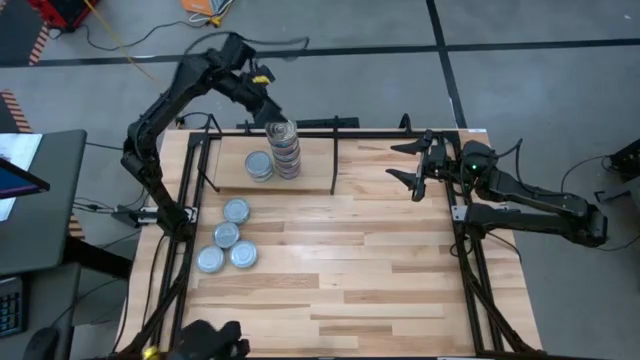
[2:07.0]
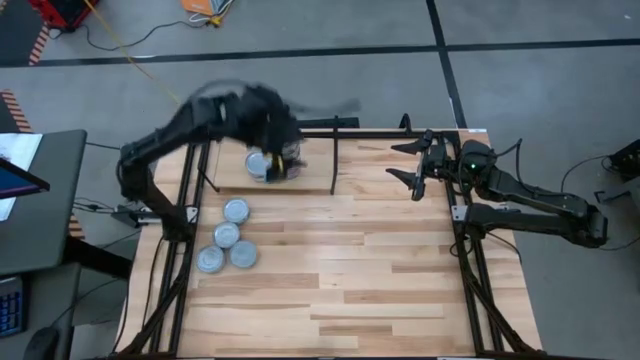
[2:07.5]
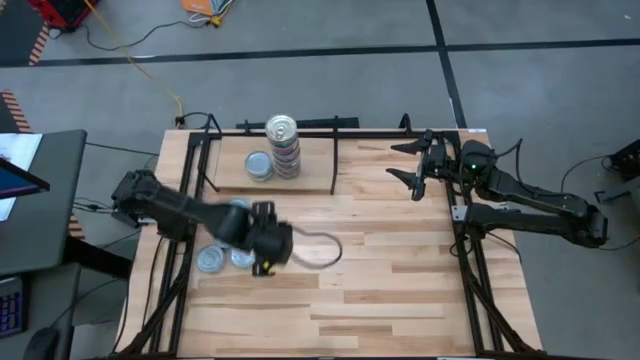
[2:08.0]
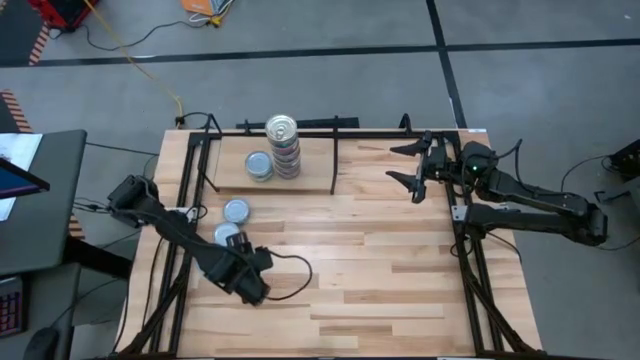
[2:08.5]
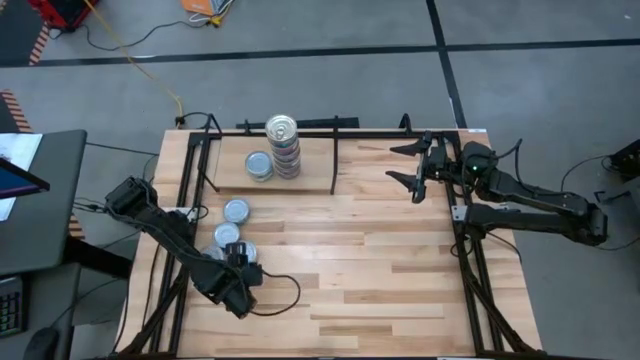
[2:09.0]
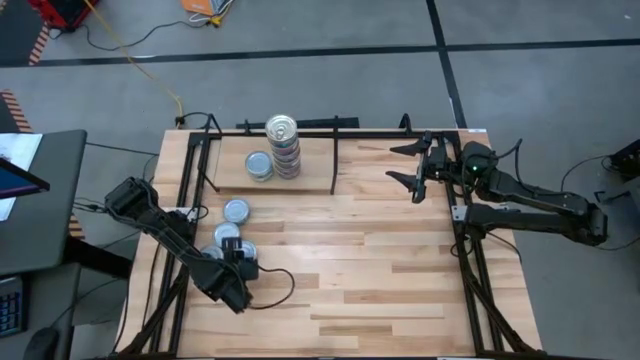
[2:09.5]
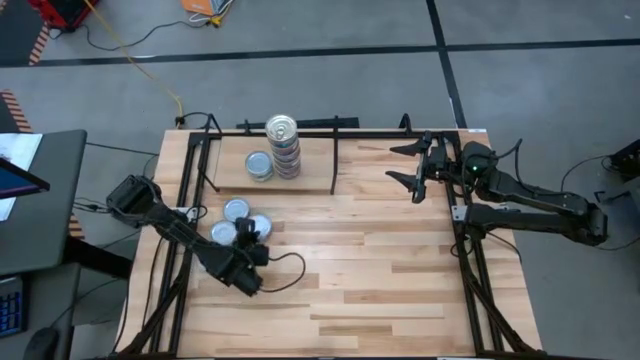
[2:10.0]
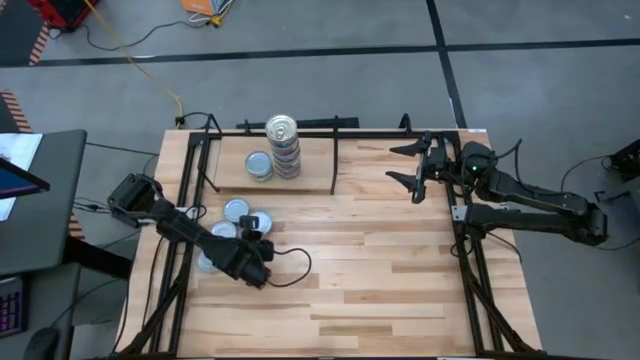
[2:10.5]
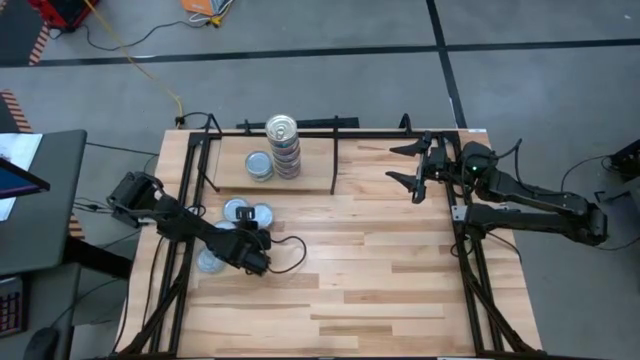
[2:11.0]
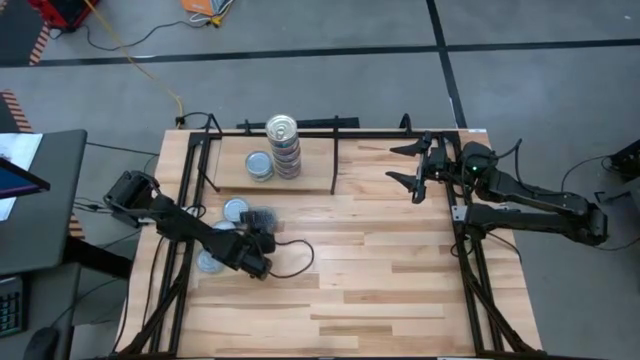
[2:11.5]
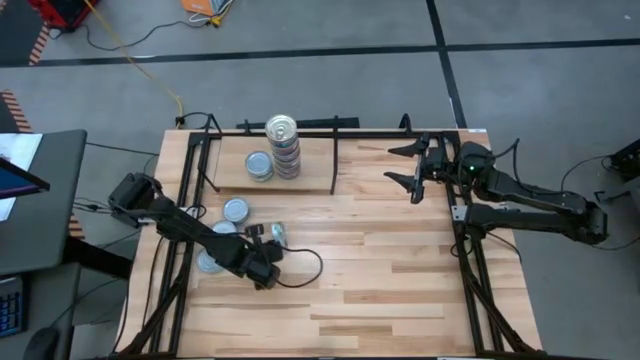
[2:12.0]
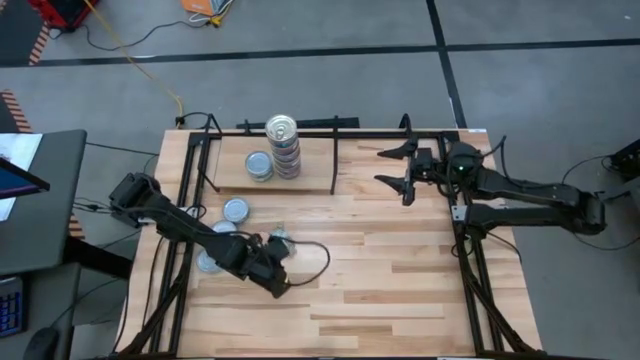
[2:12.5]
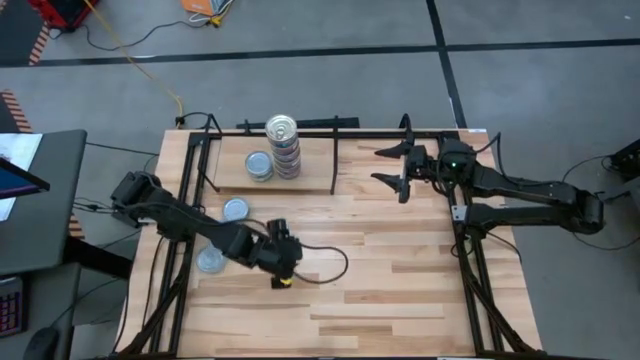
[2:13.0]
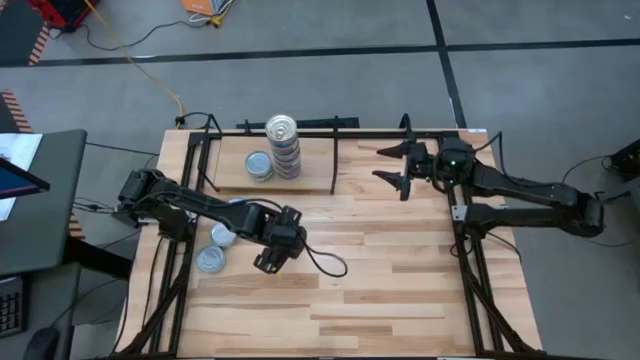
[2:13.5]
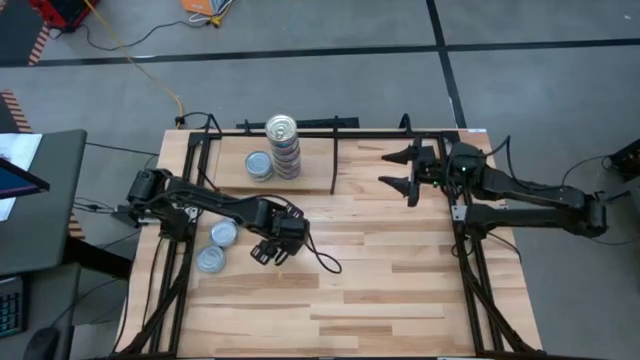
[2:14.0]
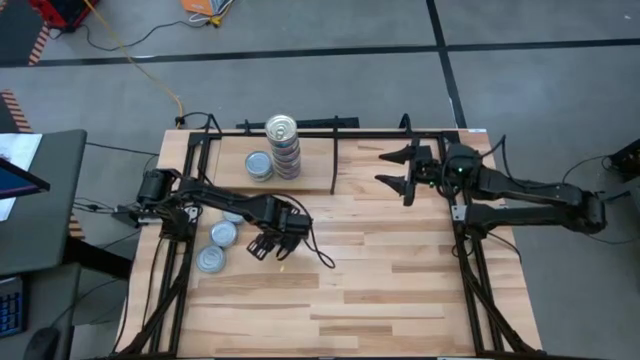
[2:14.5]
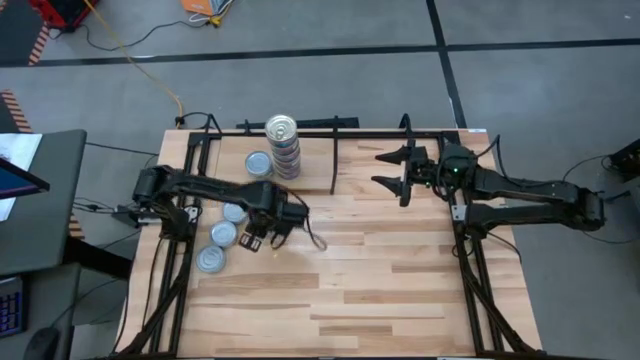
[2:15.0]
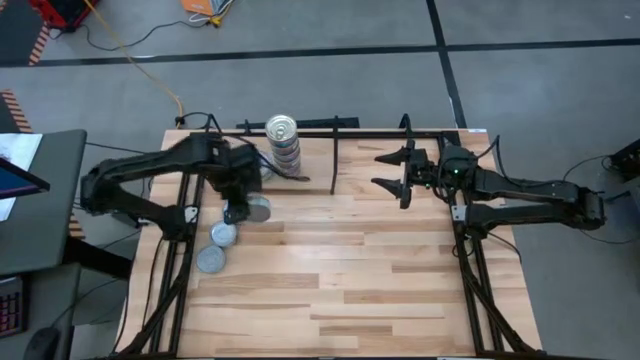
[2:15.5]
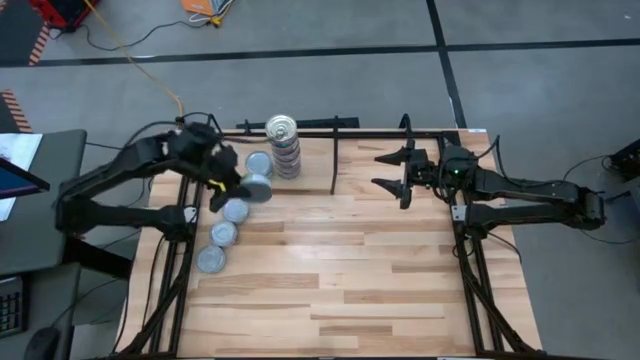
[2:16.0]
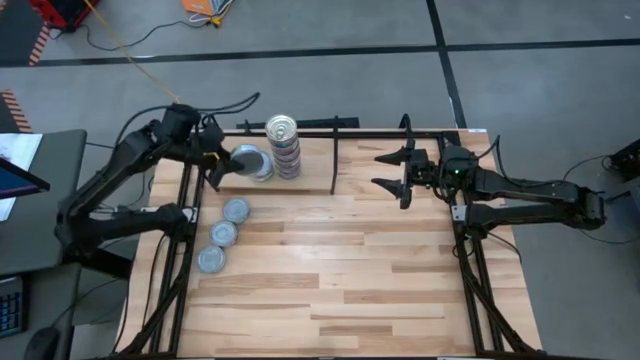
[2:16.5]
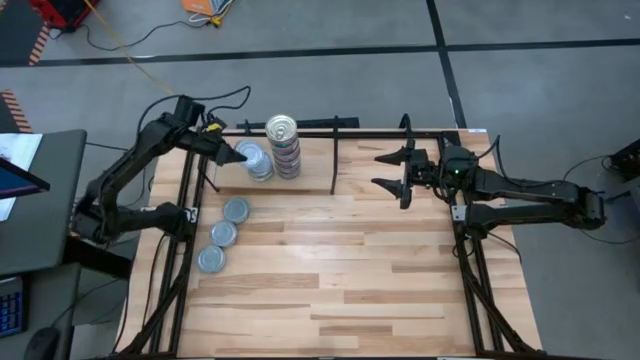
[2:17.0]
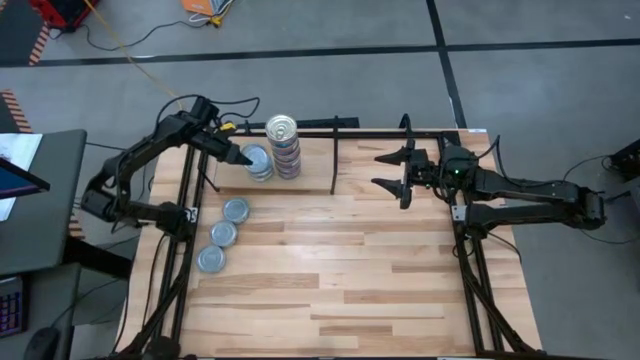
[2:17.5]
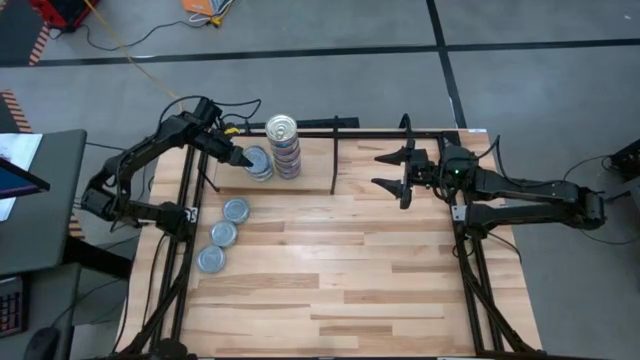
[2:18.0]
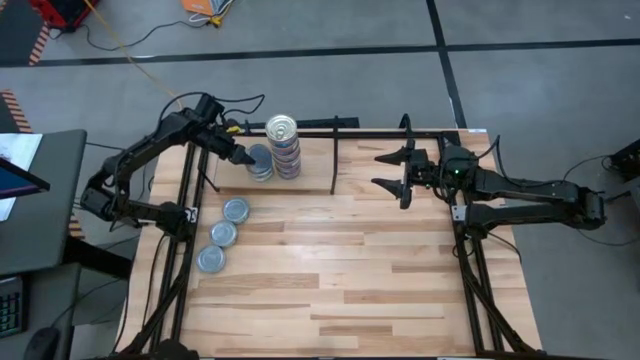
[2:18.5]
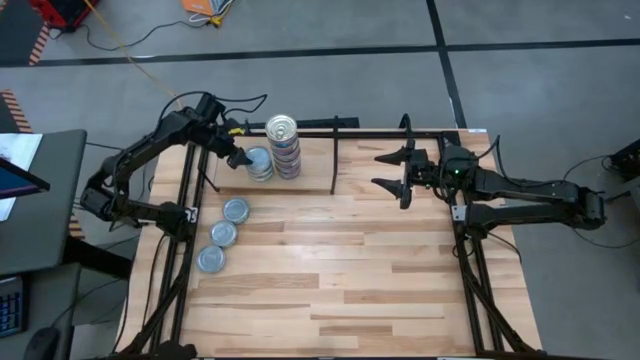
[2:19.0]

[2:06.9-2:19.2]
Task: Stack canned seafood by type on shelf
Stack the green tuna can on top of the green tuna cans on the shelf

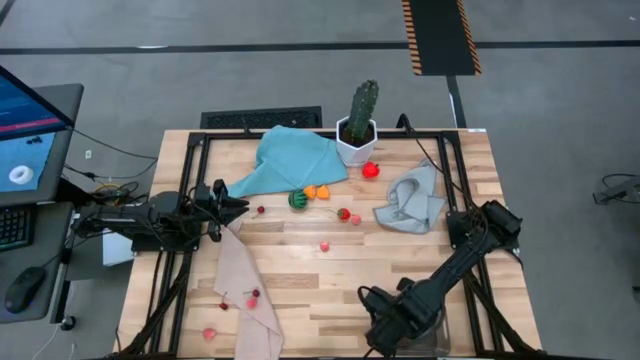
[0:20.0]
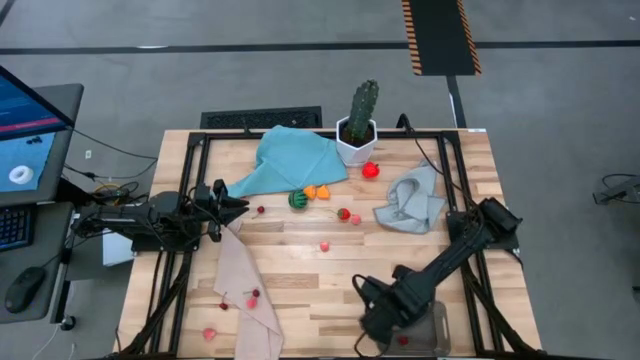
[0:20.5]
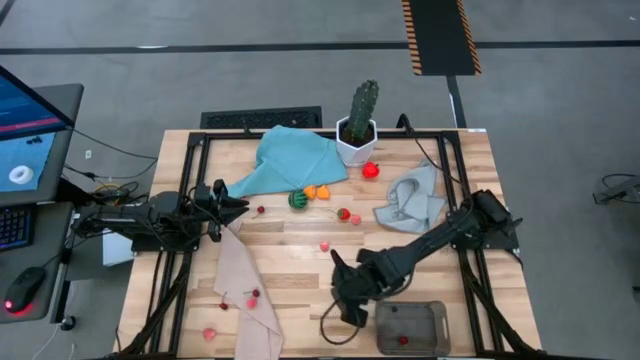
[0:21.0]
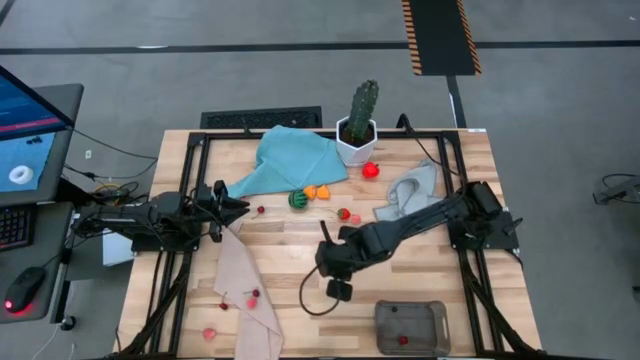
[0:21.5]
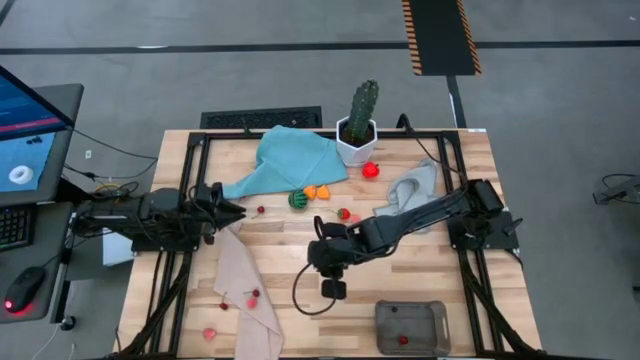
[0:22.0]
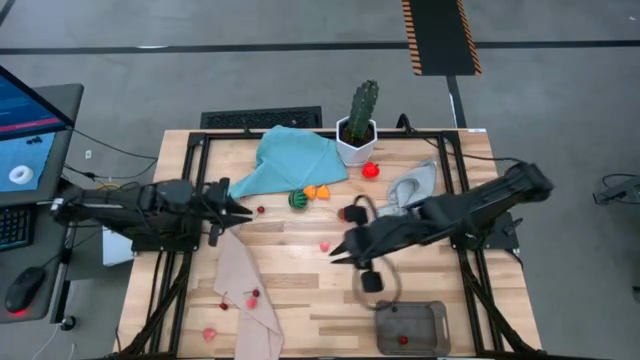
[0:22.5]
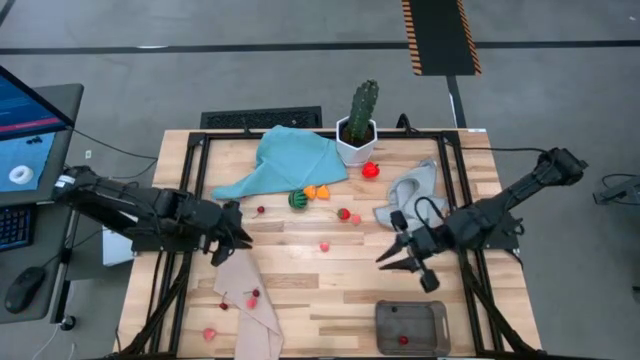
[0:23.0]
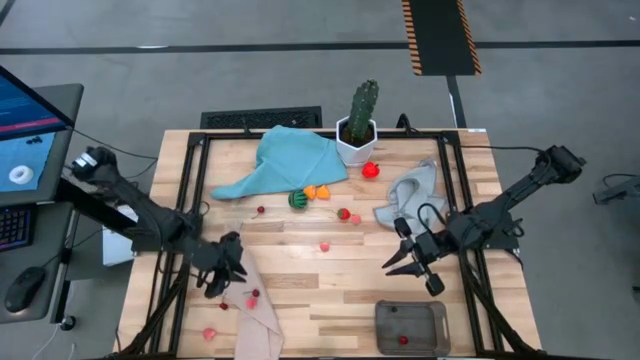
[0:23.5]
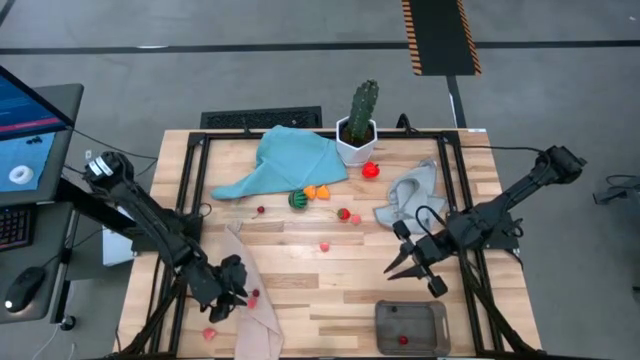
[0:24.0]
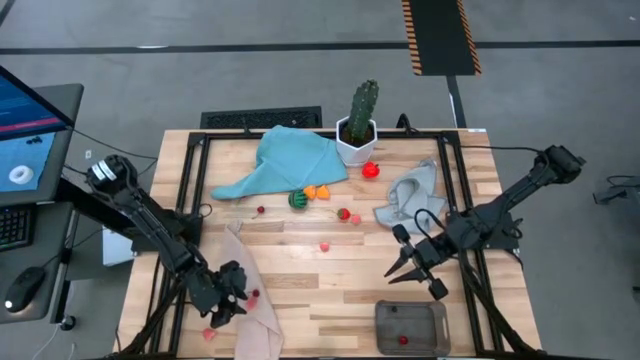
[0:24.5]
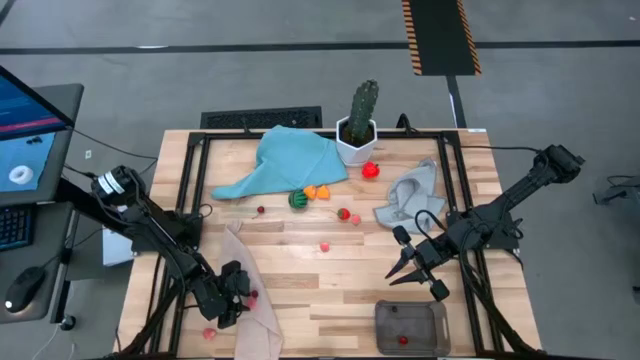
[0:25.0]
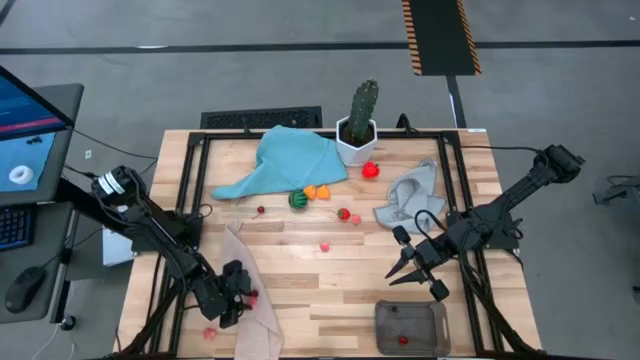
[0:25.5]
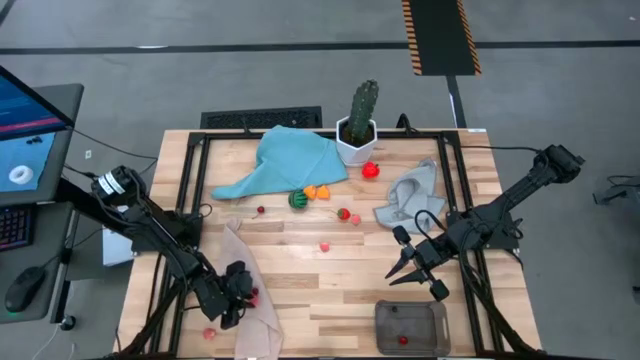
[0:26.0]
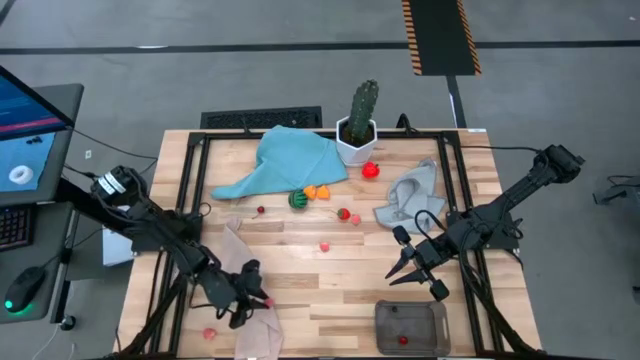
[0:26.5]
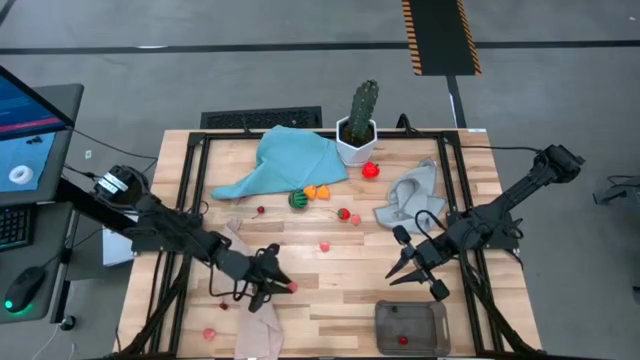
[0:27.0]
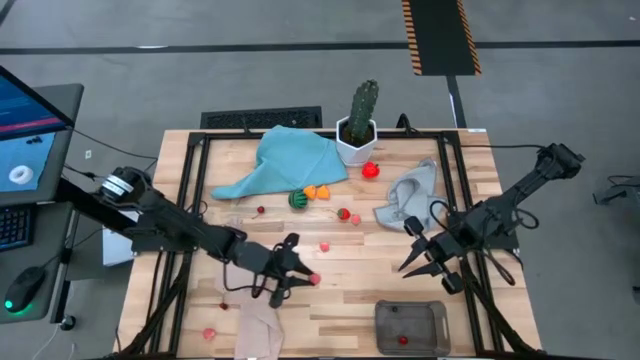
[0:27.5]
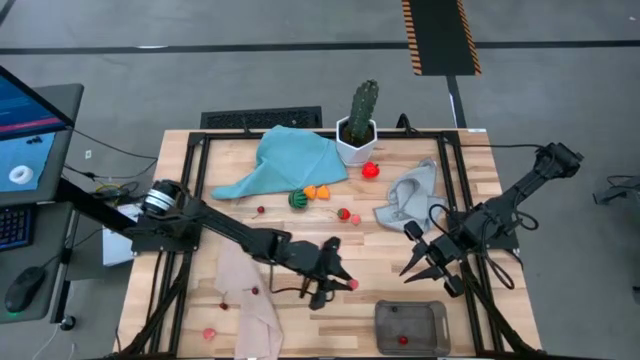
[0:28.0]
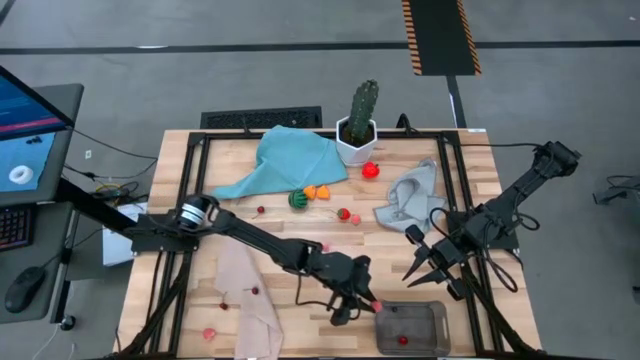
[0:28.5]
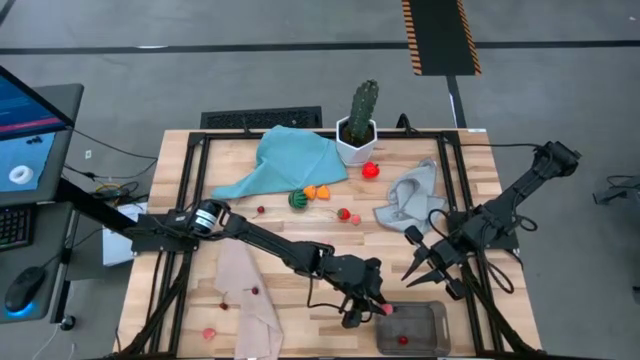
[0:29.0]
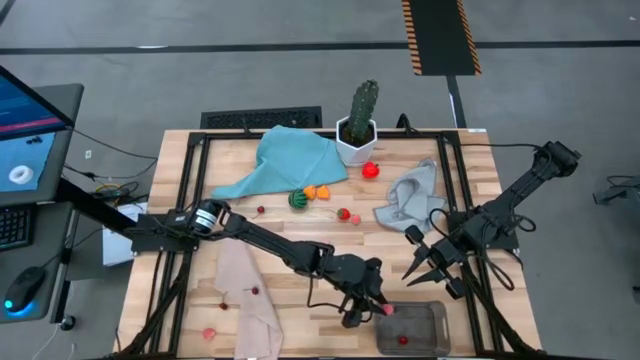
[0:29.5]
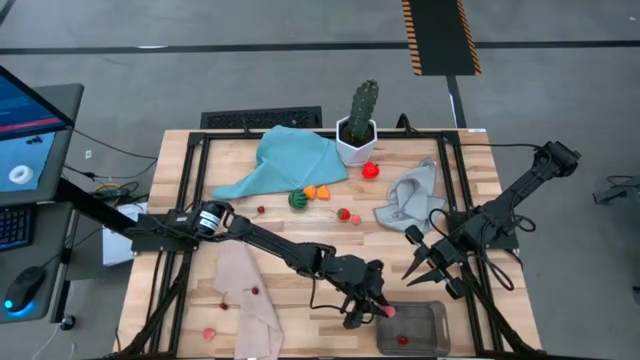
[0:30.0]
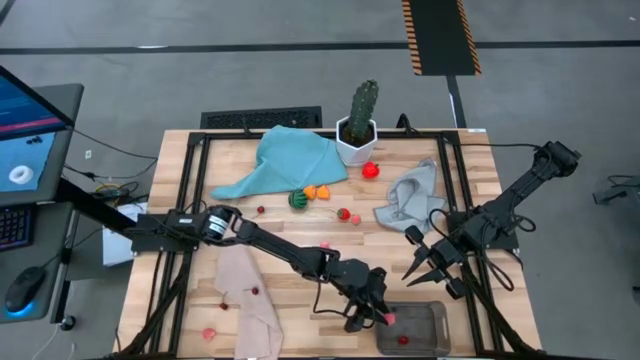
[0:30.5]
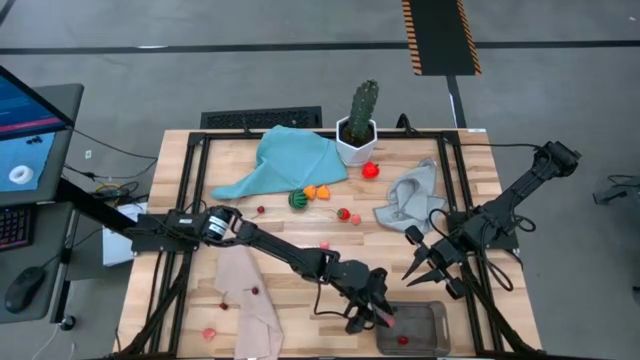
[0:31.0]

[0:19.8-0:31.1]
Task: Pick and placing Produce into tupperware
Put the peach into the black bin
